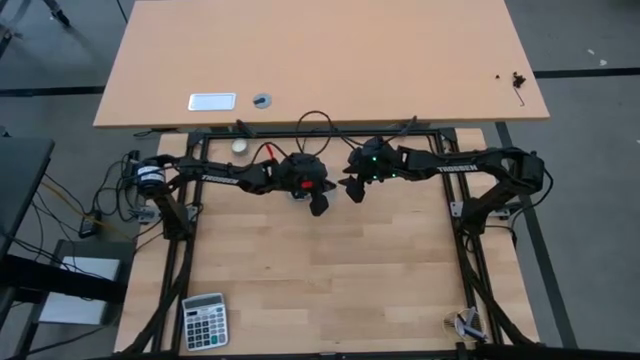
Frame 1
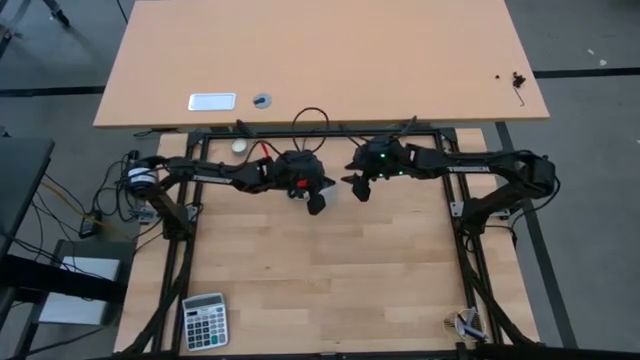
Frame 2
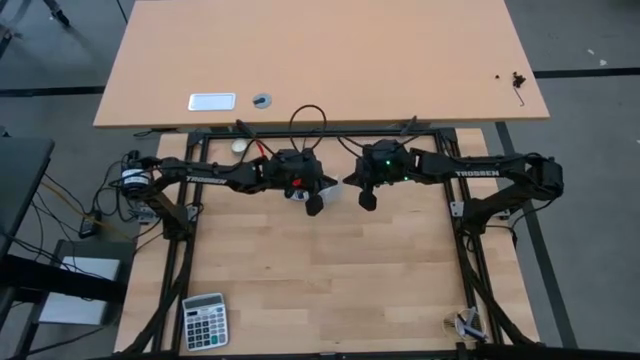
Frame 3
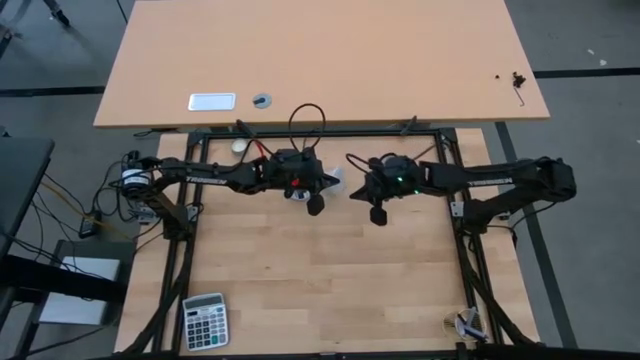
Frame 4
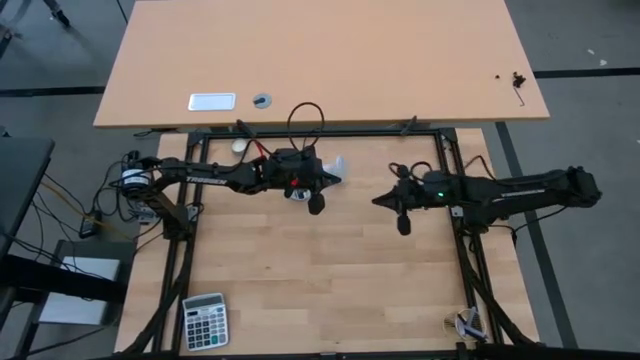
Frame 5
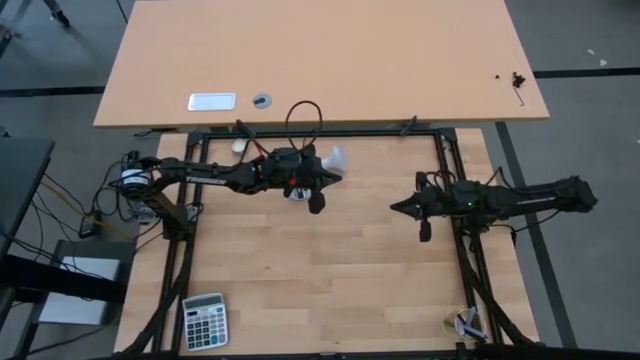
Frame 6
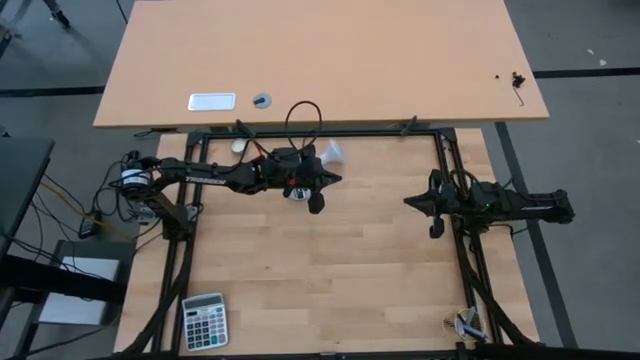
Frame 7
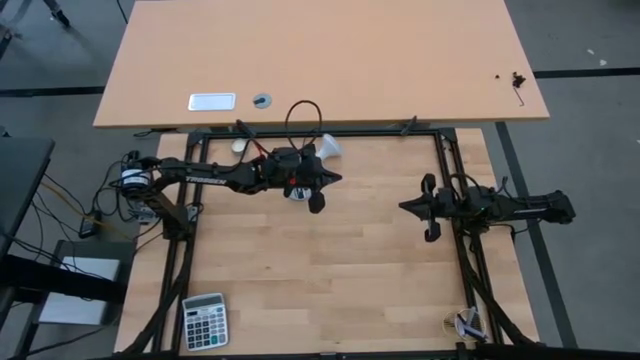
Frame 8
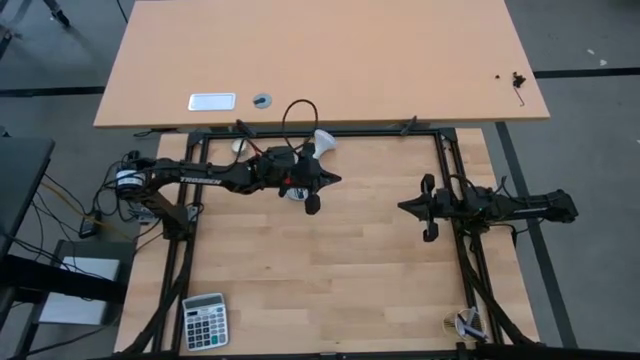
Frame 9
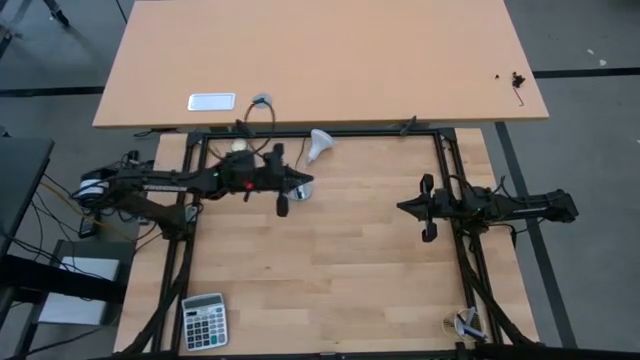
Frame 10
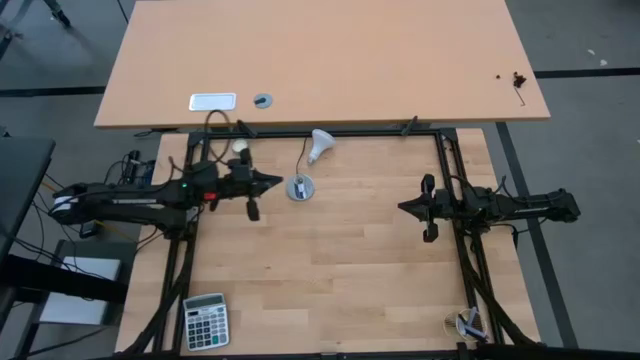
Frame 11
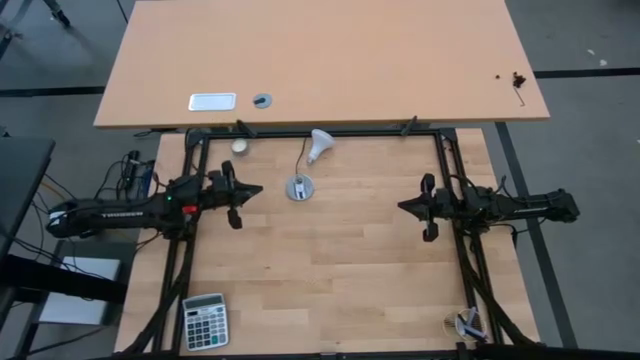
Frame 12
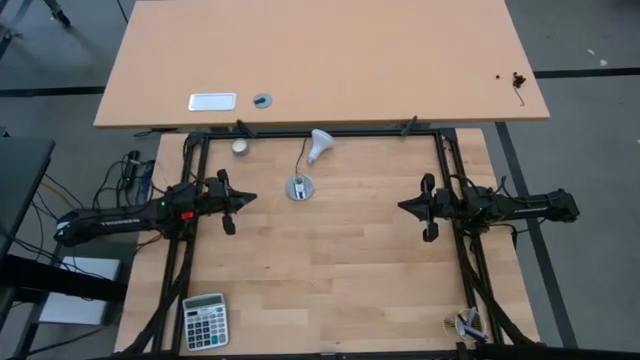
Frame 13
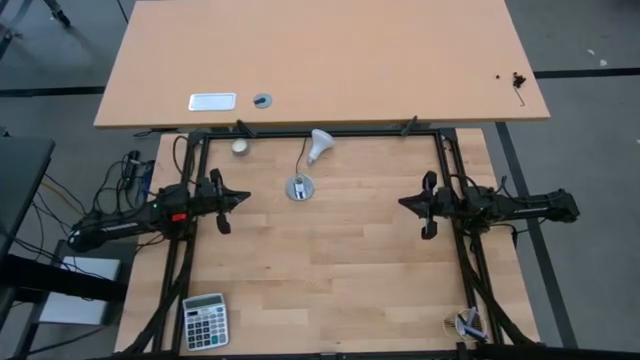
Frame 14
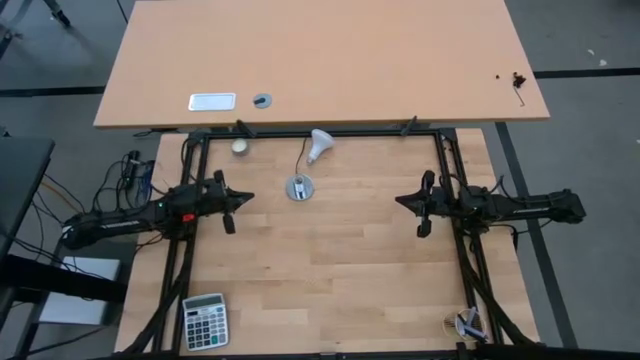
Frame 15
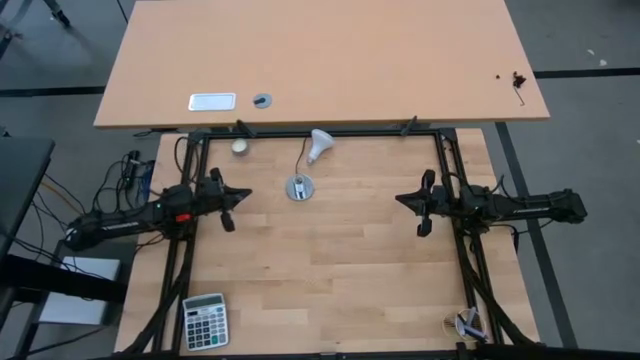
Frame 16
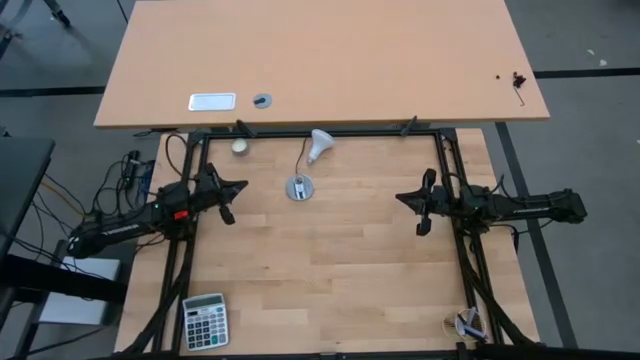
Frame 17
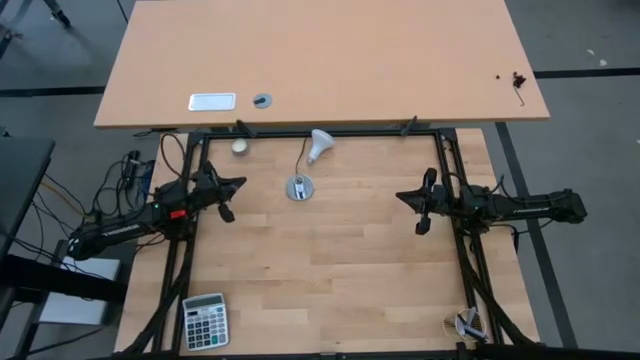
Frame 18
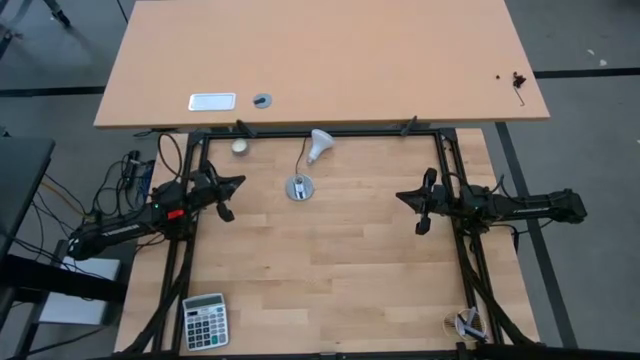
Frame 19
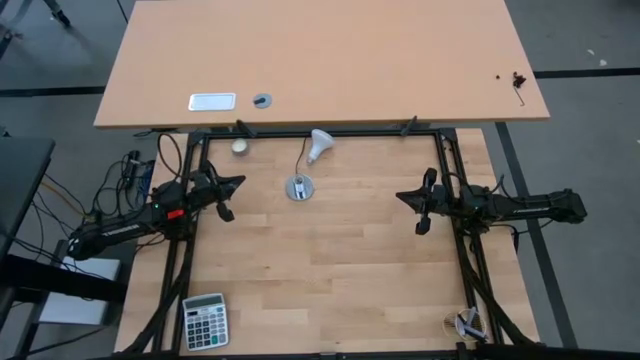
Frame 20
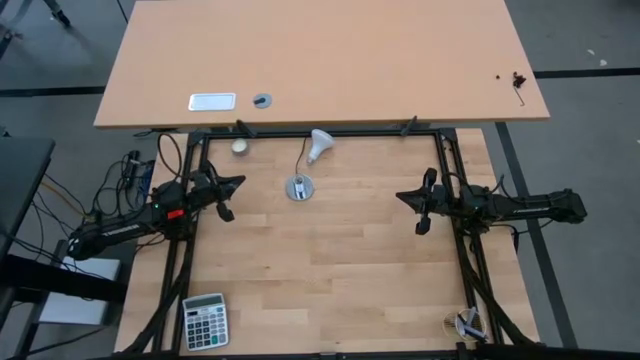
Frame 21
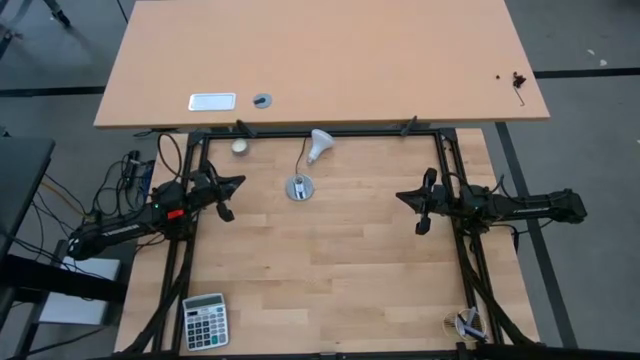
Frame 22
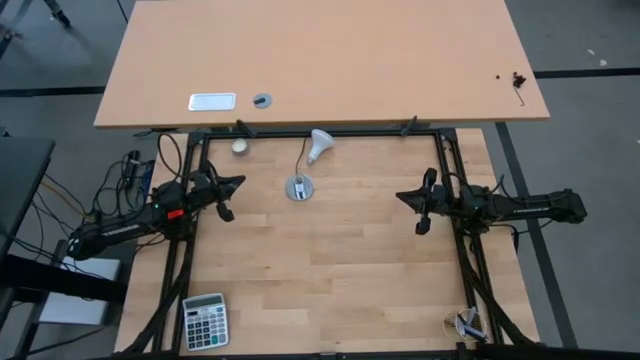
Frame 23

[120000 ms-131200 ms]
Task: Screw lightbulb
Return to Home Position

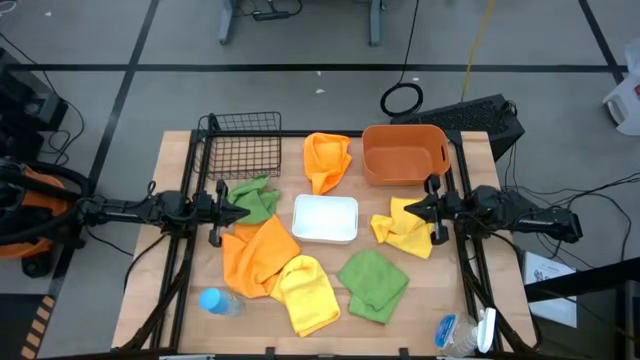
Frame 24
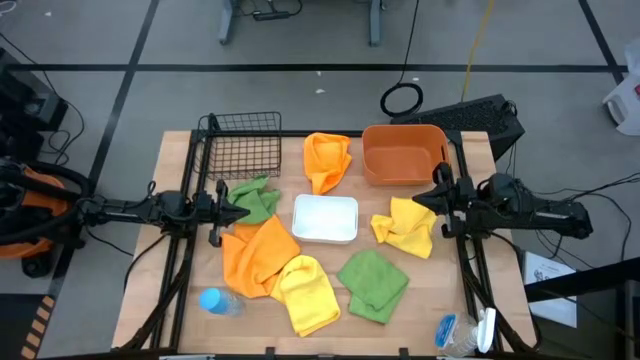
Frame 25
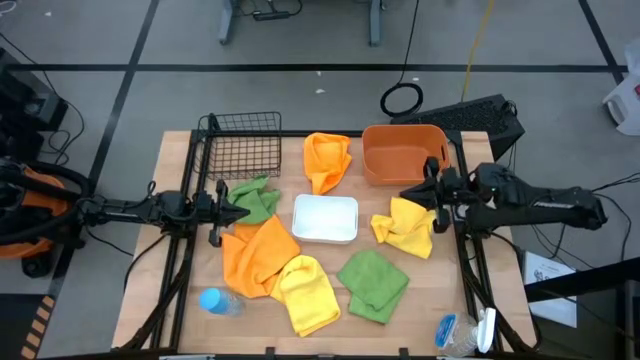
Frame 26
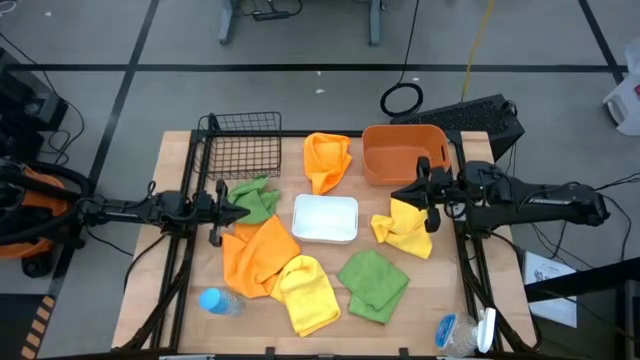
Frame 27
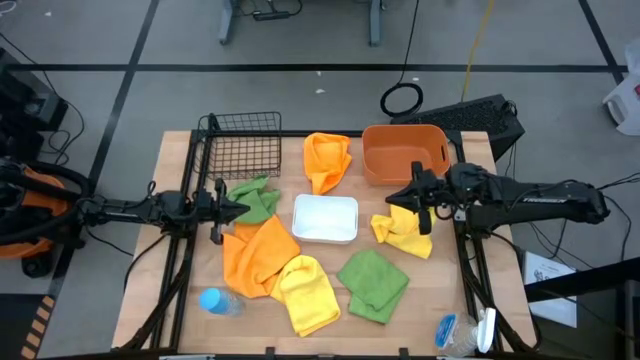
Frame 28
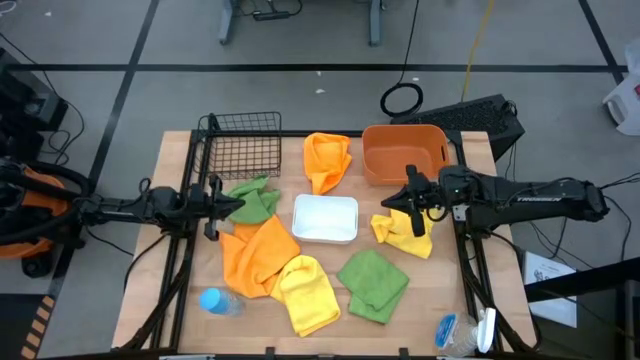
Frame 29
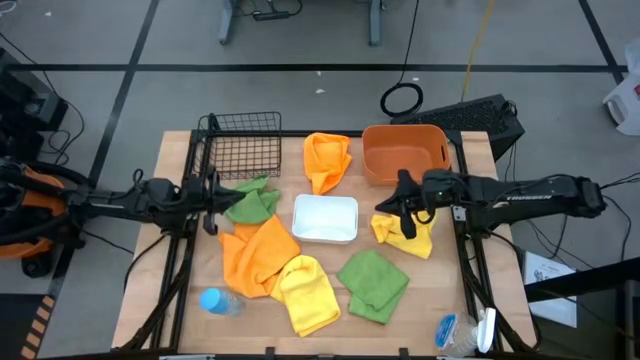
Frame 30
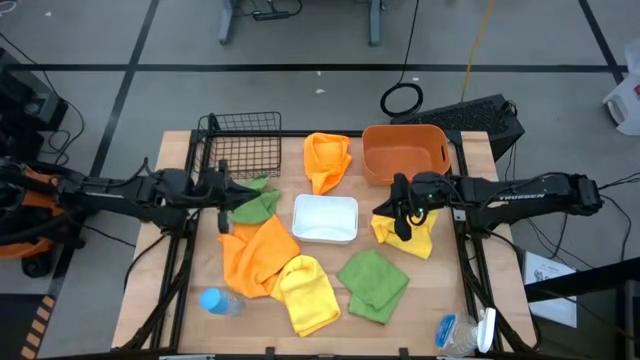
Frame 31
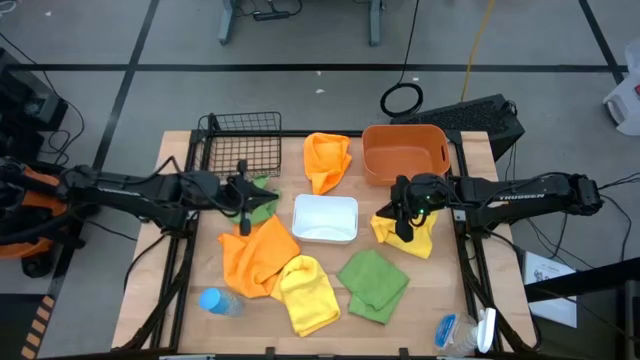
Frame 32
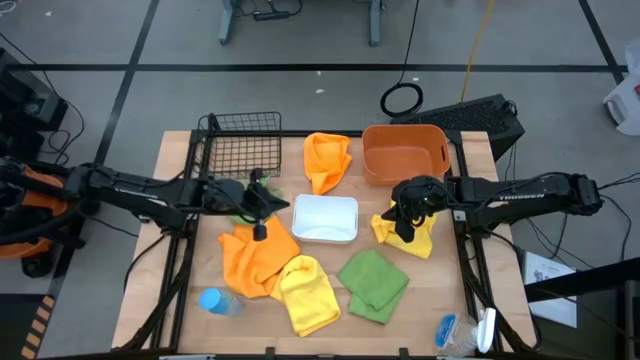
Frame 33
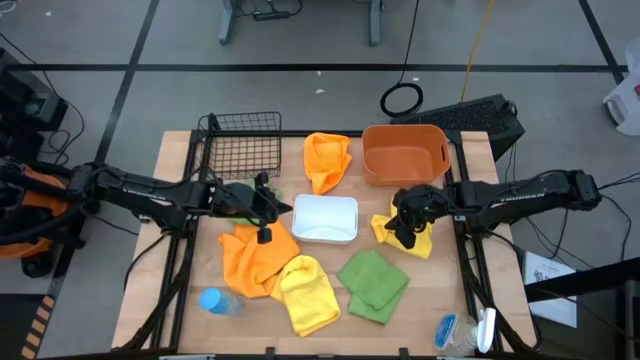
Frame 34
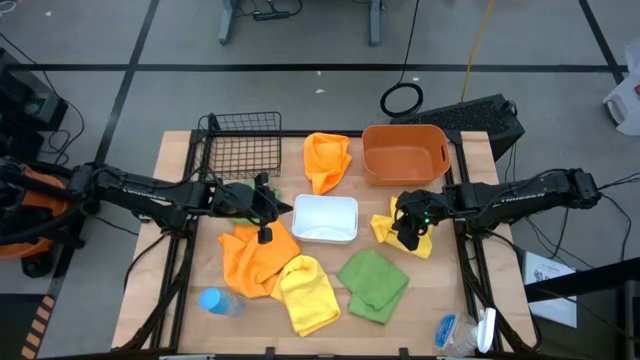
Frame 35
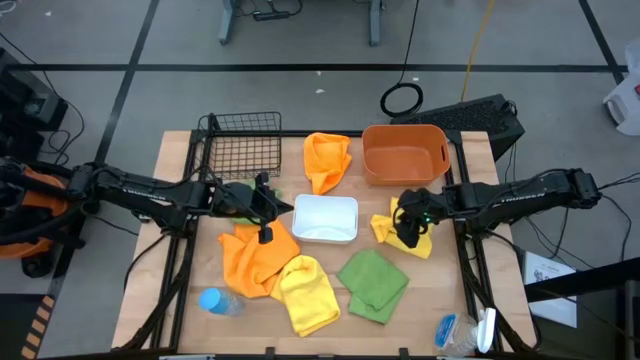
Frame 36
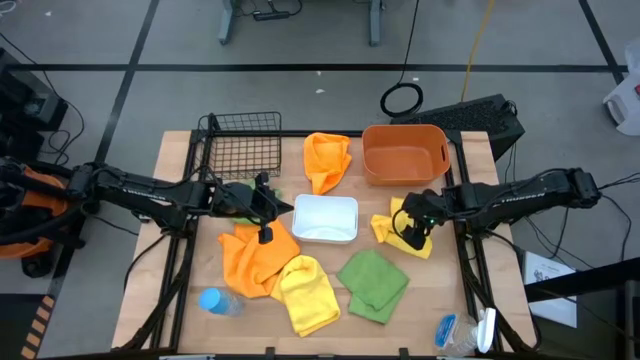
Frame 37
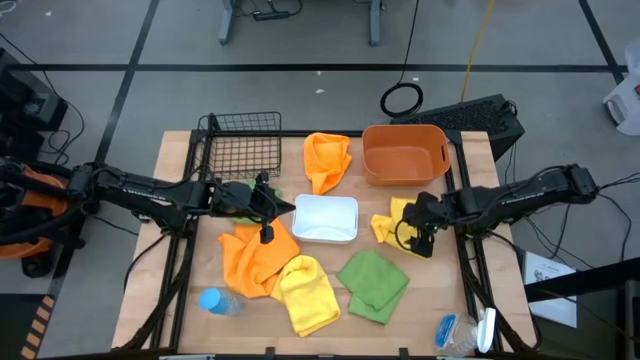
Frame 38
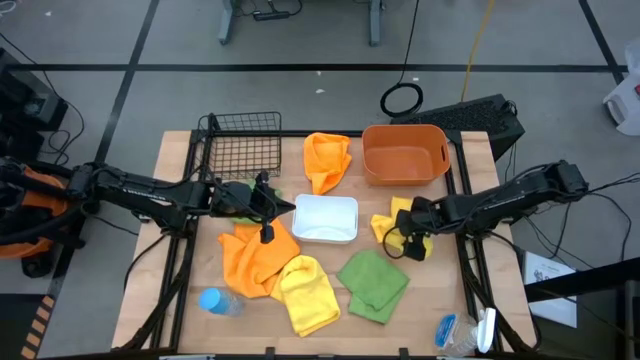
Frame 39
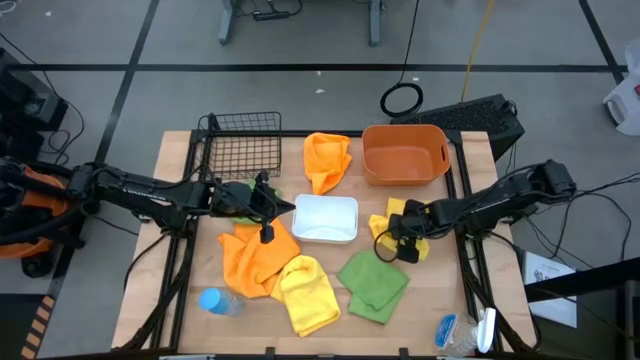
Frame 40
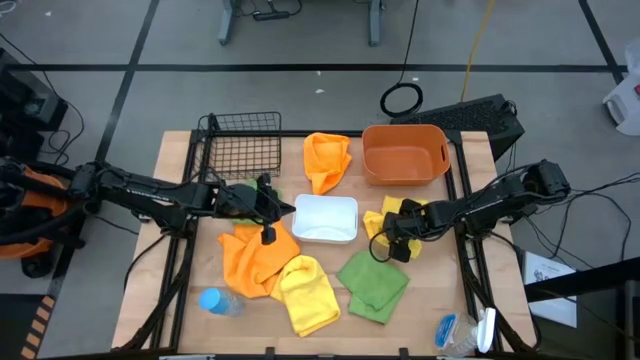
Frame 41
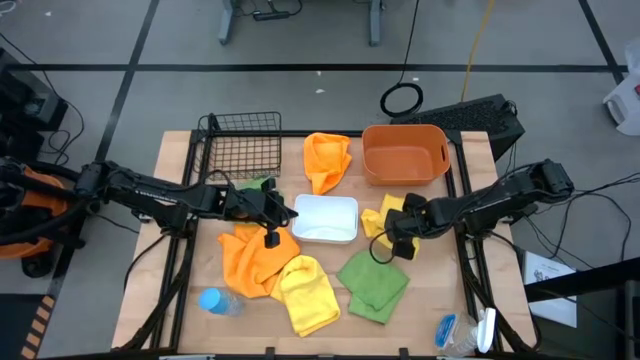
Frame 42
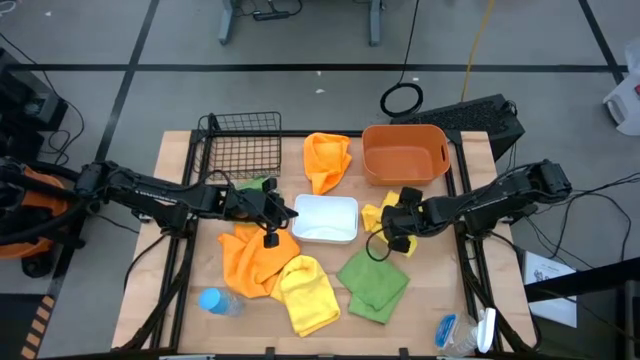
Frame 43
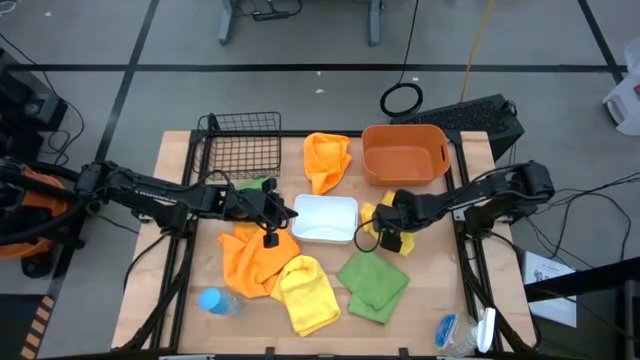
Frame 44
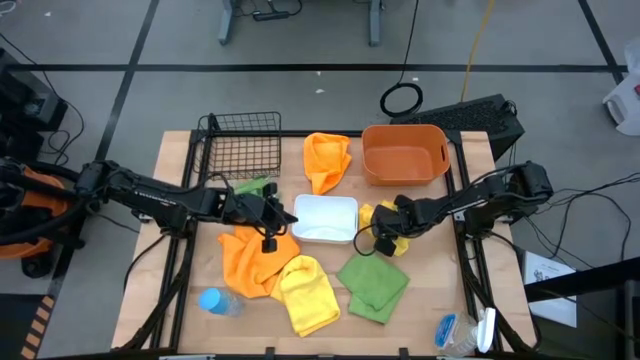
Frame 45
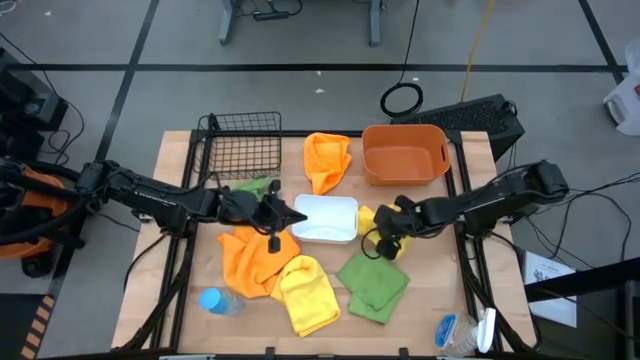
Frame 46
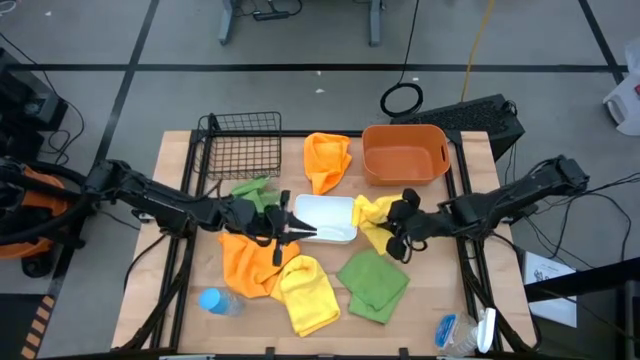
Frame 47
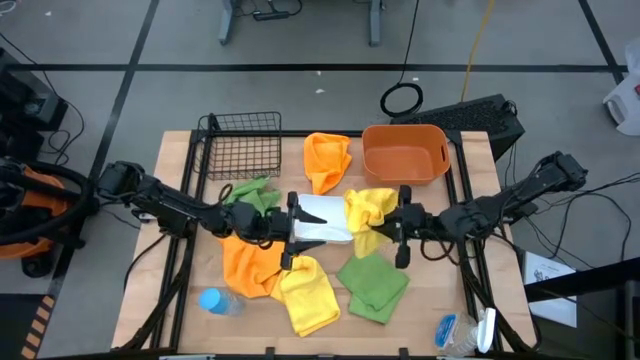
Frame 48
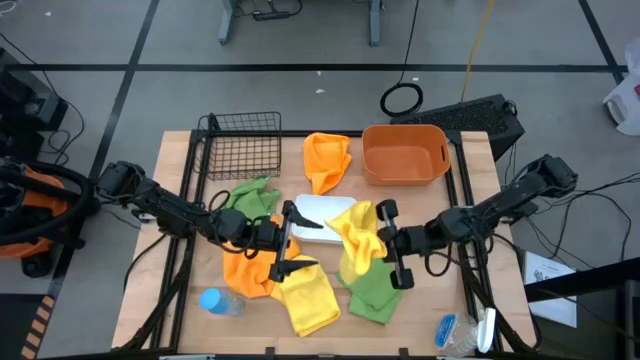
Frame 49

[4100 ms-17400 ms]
Task: Sort microfiber towel by color & place in baskets
Put the top yellow microfiber towel into the white bin
